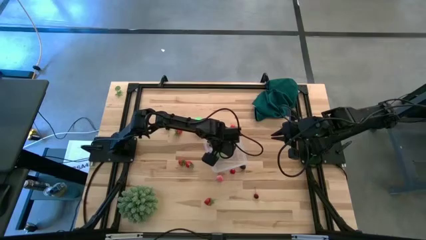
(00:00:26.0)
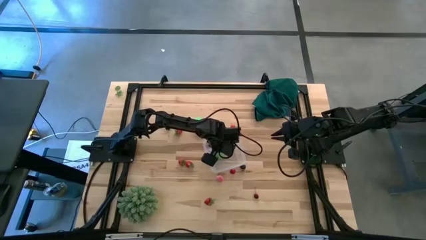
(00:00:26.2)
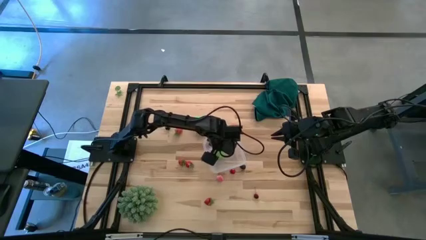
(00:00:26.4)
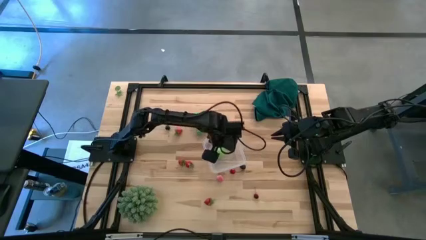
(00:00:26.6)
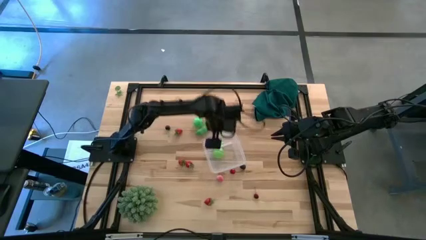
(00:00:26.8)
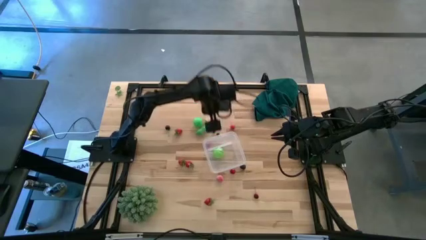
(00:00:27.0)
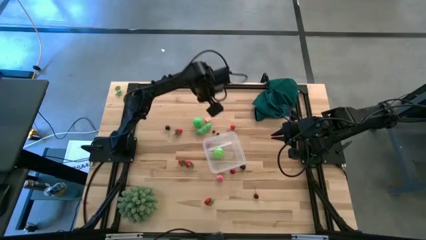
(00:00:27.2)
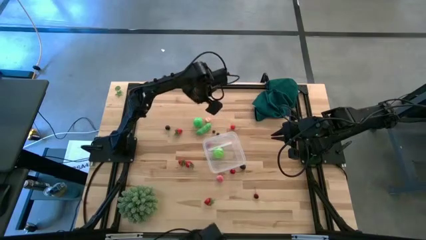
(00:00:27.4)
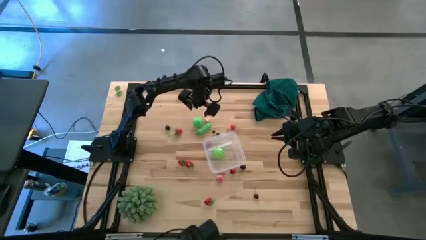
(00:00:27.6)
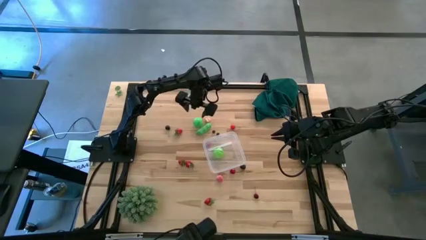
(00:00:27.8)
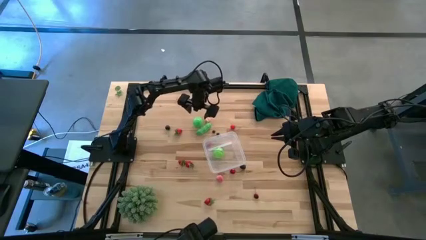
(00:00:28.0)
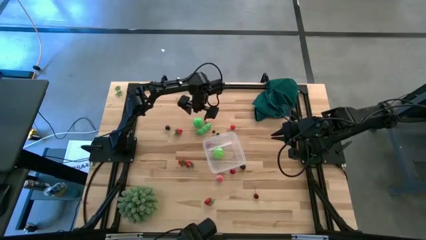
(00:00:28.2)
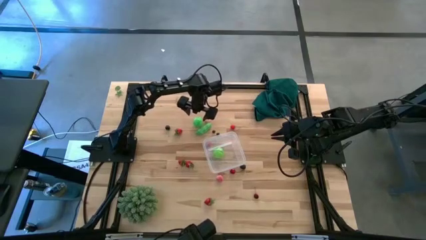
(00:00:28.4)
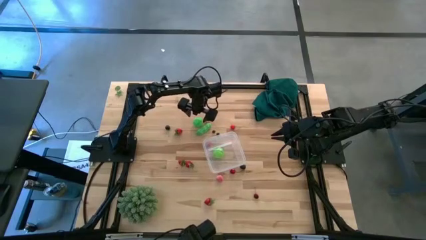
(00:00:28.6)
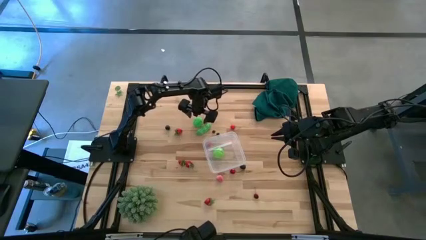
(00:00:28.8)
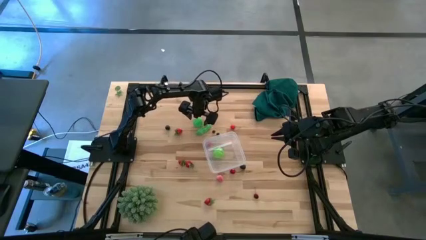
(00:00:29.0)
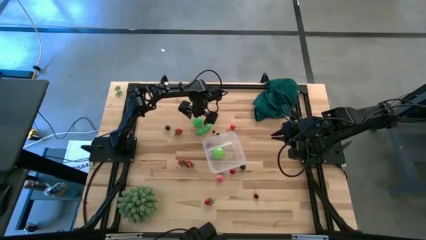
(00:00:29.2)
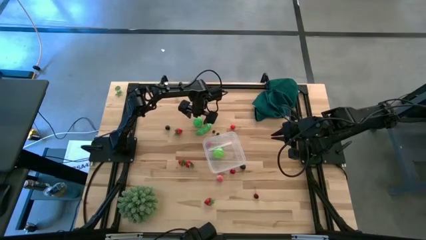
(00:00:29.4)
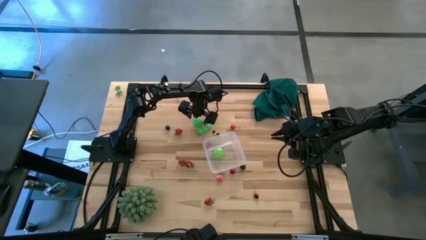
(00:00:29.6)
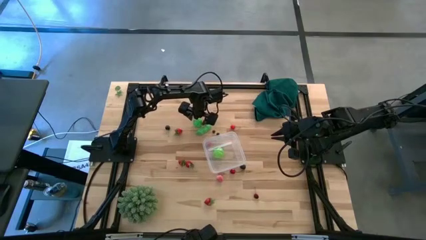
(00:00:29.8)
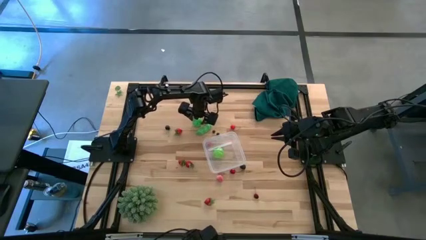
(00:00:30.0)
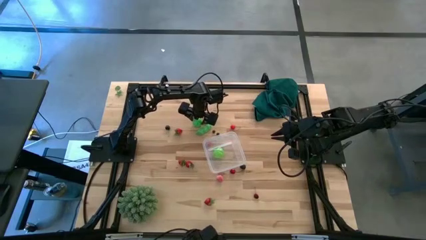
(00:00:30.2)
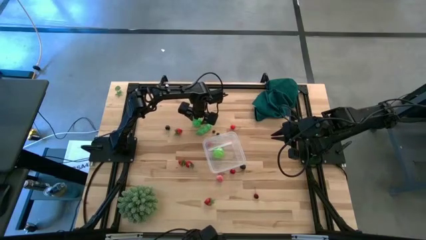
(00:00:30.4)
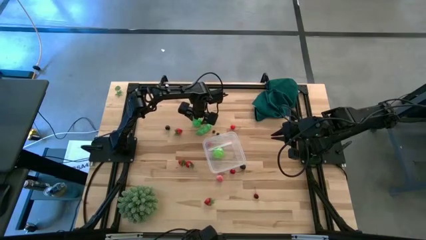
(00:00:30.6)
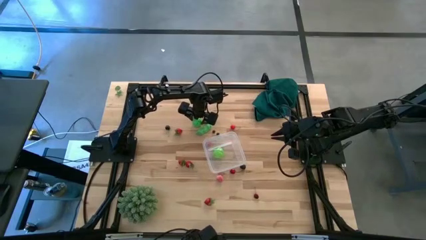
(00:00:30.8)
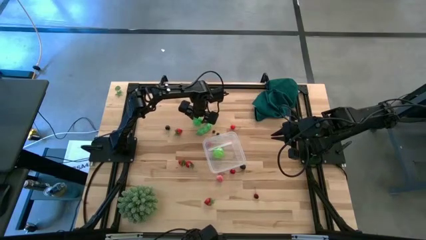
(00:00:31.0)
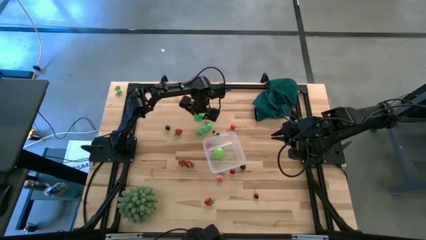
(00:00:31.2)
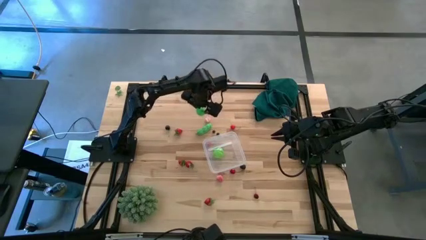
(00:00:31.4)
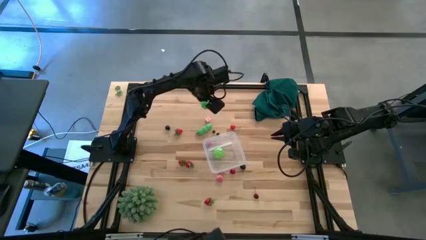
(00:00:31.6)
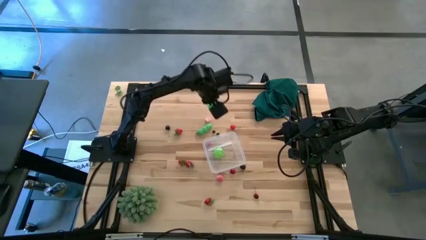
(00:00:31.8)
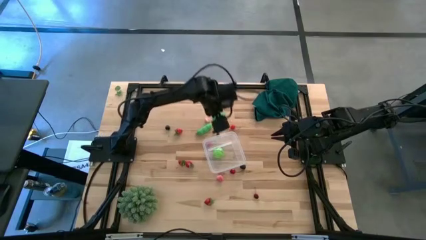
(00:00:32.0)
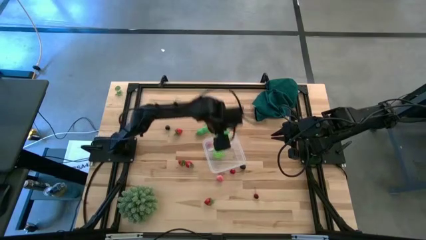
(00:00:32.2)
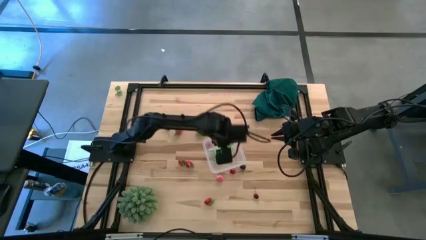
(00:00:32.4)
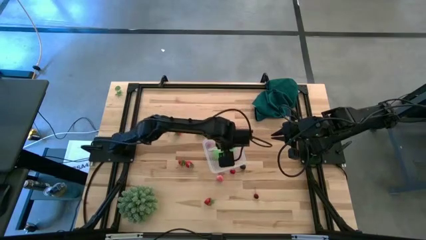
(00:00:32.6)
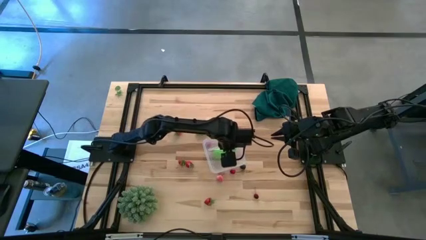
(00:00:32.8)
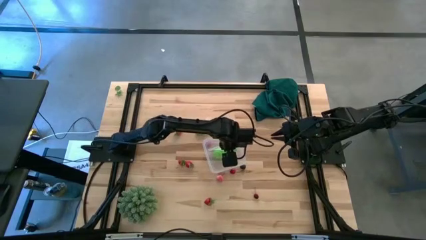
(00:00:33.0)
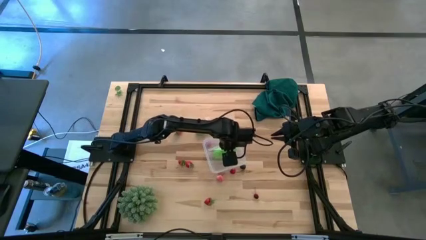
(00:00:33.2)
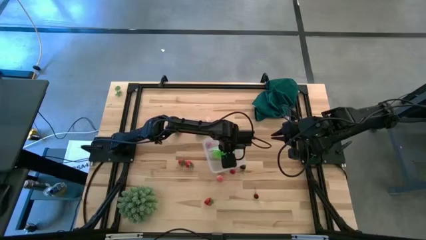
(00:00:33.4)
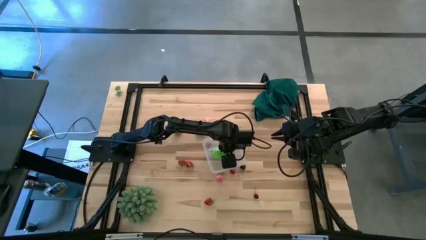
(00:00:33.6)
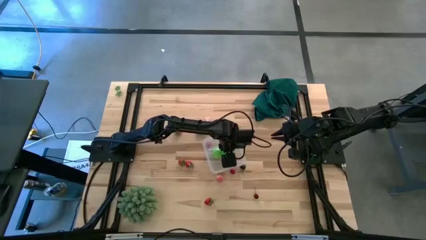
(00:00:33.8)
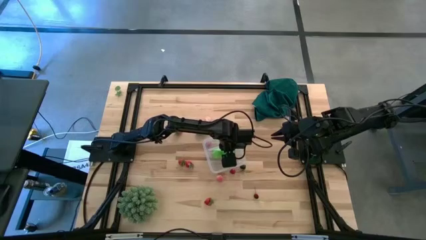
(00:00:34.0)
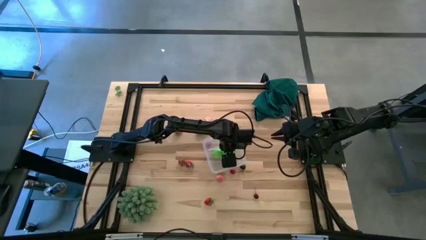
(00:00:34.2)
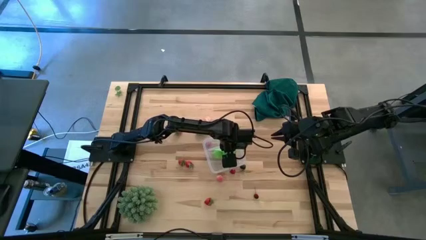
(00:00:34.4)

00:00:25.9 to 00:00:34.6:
Task: Pick and placing Produce into tupperware
Put the green pear into the transparent container

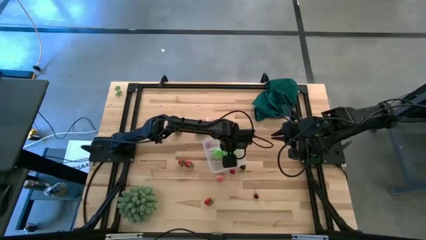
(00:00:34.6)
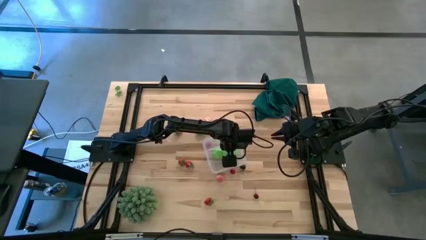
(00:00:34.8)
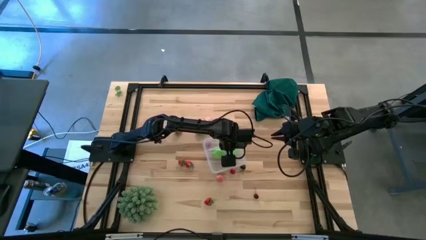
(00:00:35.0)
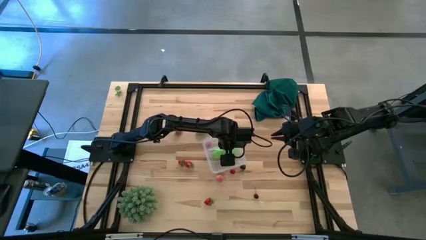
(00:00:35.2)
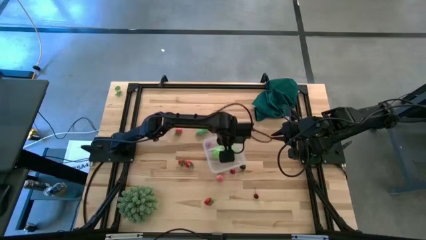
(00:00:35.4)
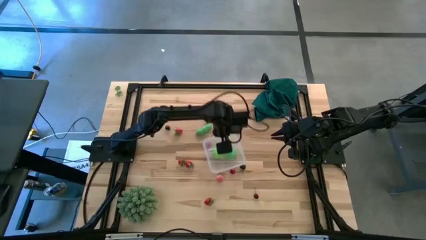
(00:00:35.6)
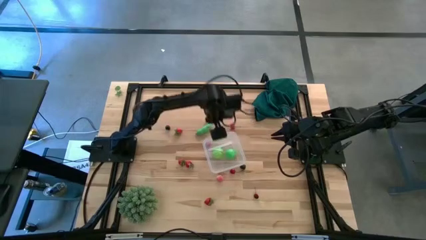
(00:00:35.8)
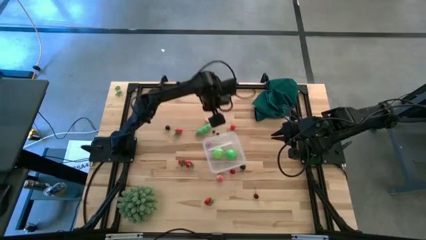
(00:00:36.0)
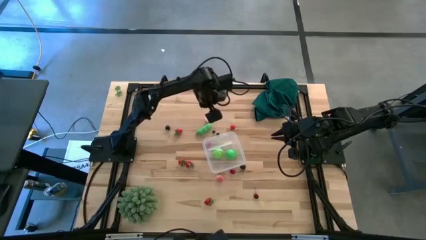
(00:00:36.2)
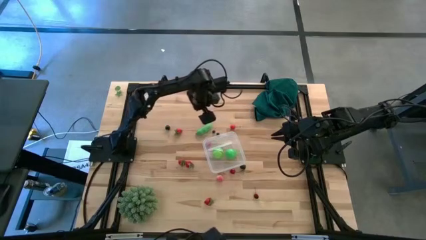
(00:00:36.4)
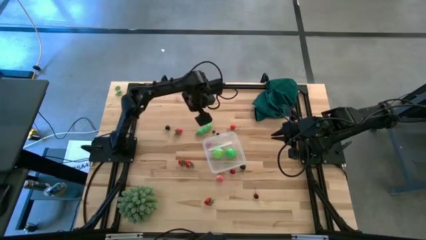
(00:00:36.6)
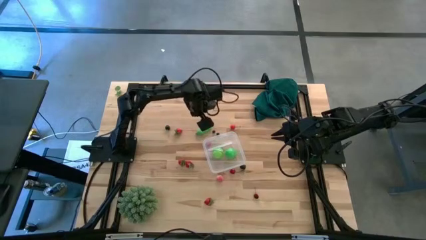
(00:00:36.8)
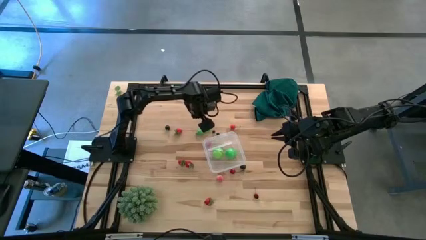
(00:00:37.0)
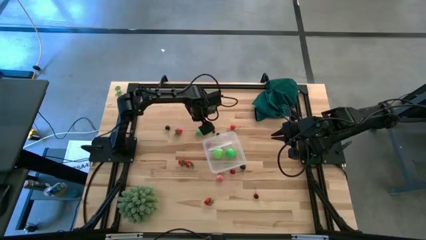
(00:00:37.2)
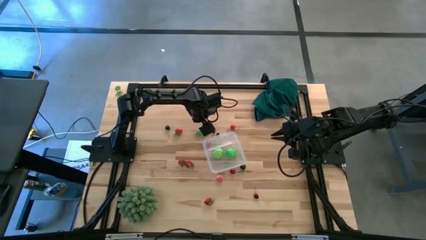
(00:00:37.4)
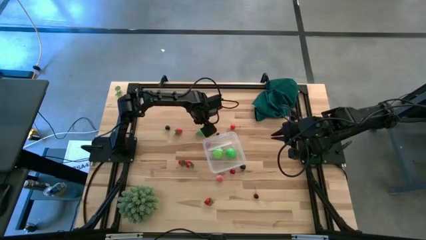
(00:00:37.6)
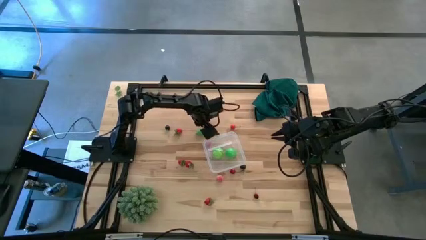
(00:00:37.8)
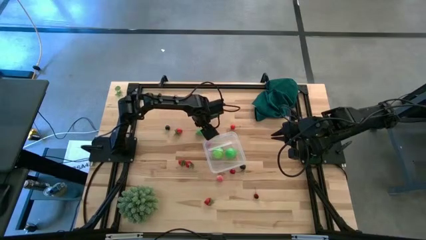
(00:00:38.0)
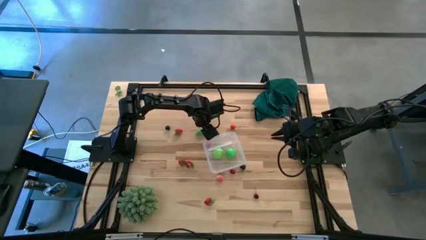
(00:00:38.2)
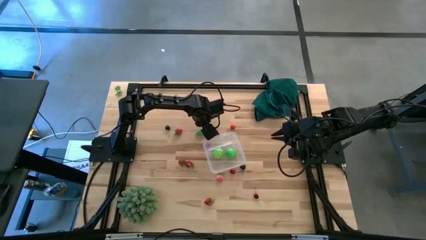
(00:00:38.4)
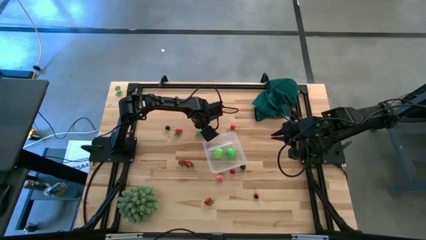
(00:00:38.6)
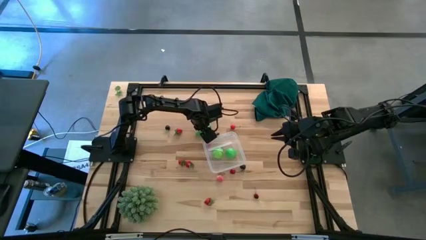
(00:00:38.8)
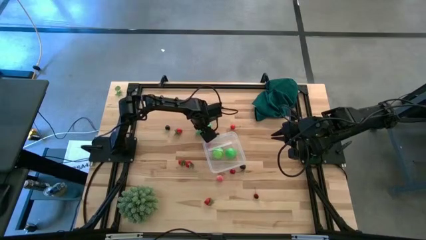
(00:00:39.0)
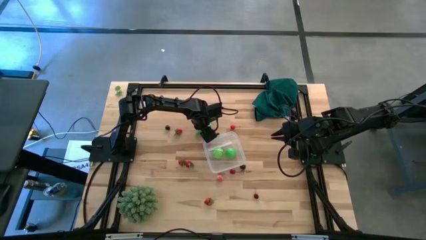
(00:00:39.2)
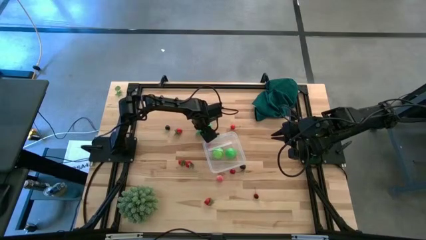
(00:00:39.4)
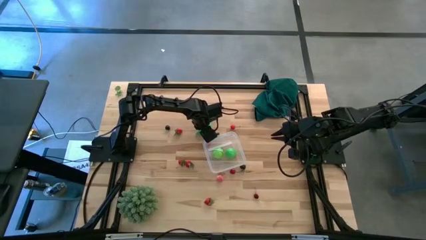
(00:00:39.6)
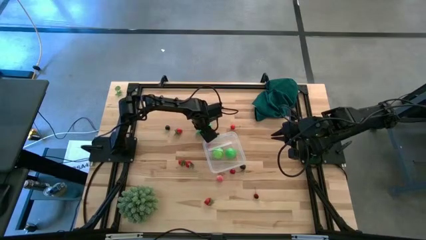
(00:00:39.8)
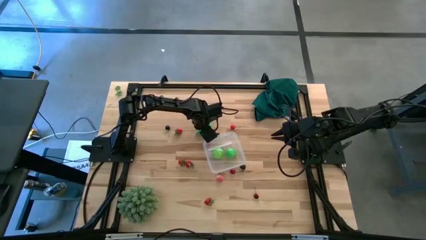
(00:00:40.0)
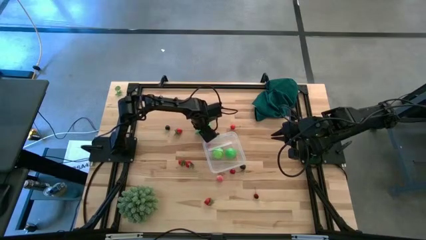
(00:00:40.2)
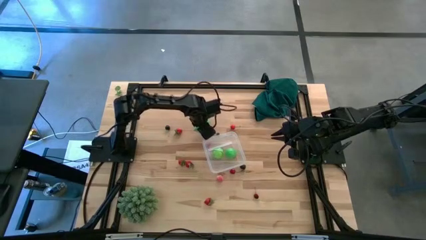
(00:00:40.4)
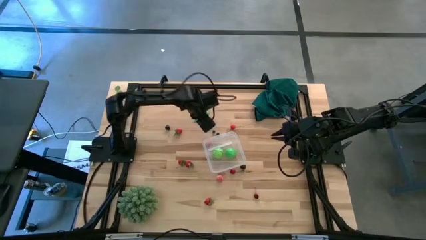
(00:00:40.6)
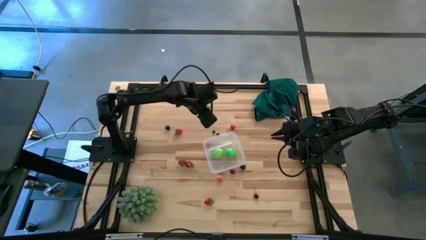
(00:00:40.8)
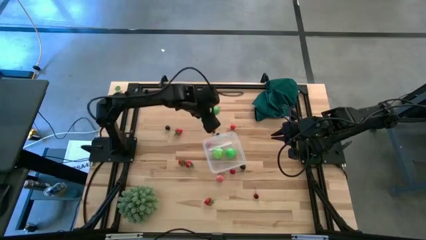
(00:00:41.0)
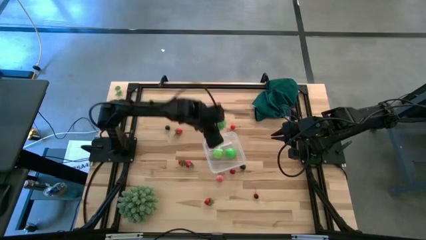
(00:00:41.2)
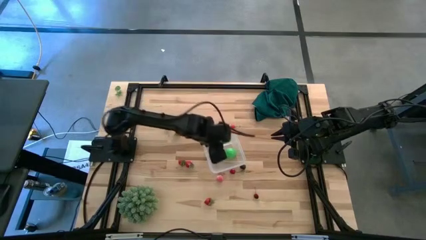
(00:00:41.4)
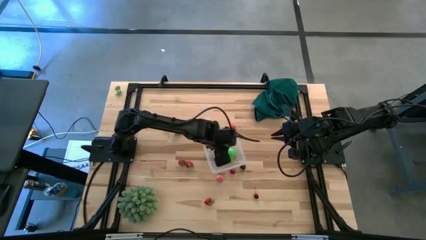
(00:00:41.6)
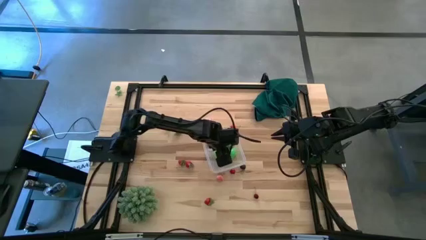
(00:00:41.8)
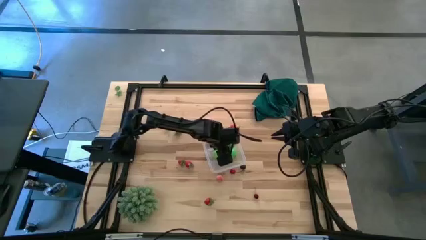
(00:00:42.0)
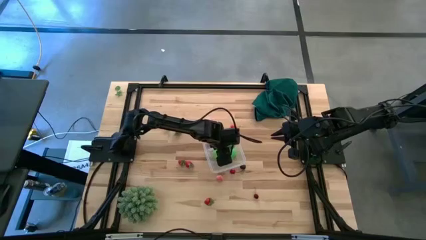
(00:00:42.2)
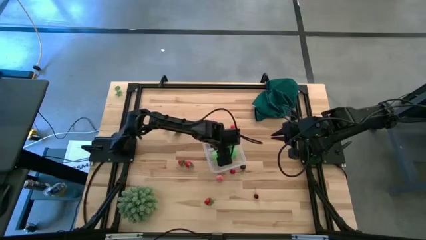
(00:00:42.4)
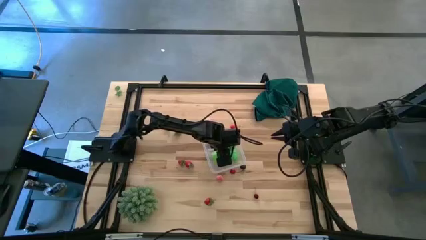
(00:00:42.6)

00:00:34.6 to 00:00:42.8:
Put the green peas into the transparent container
